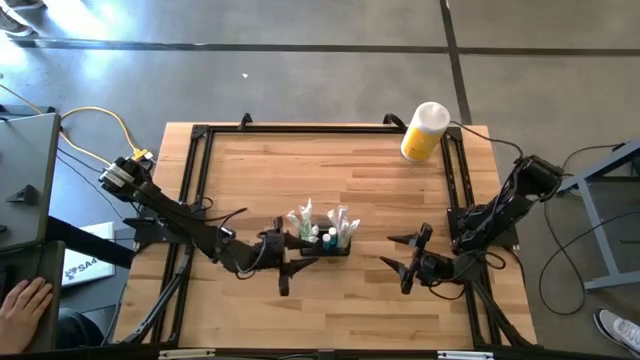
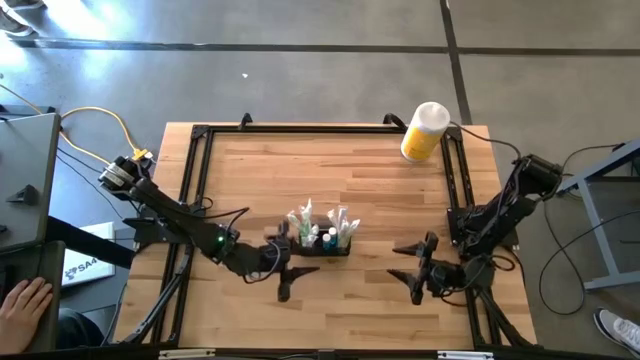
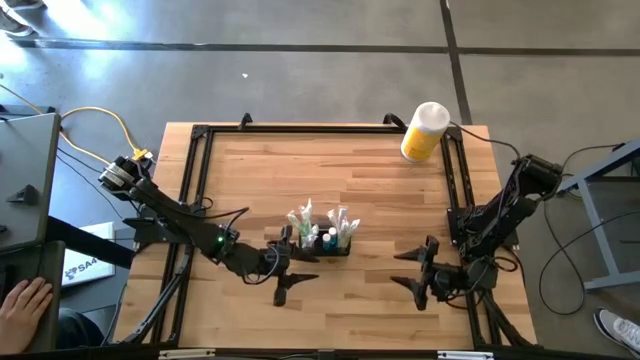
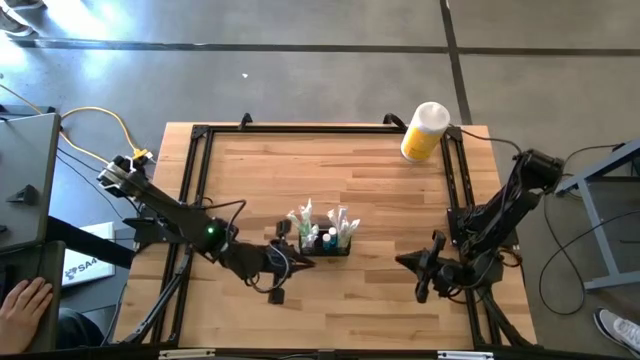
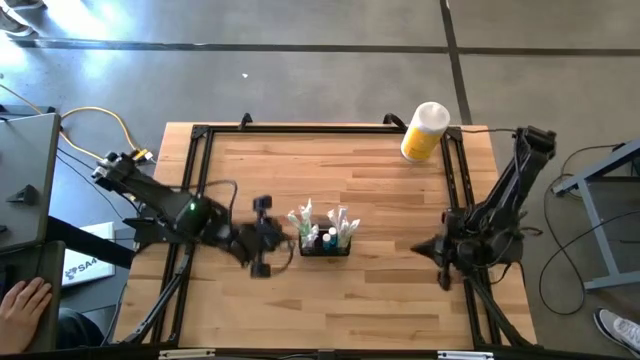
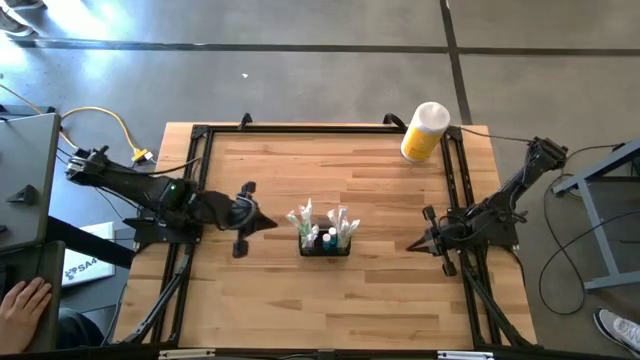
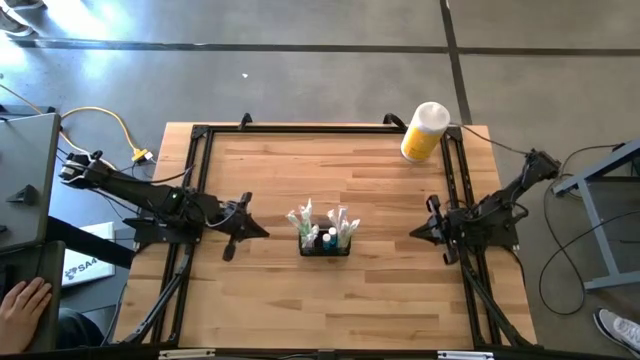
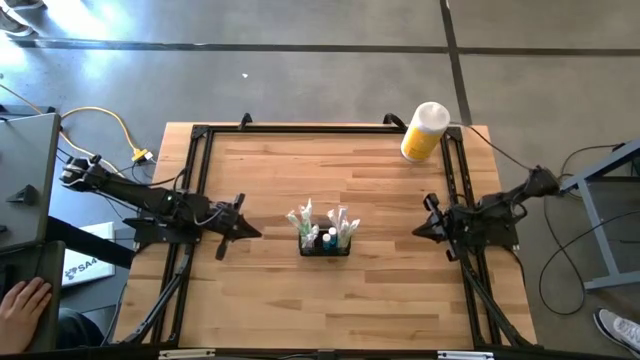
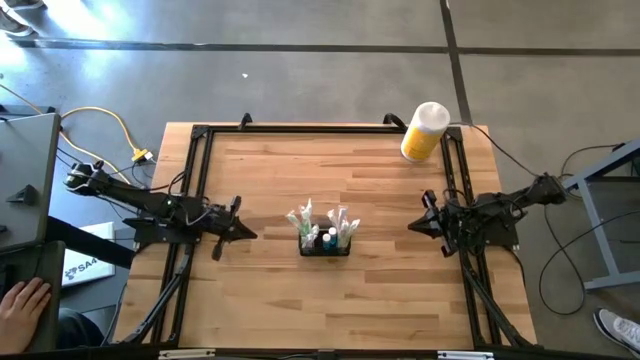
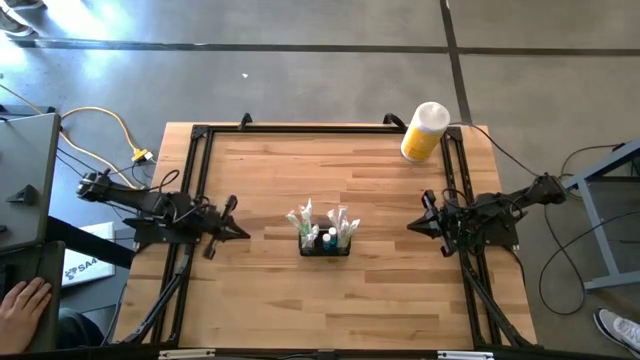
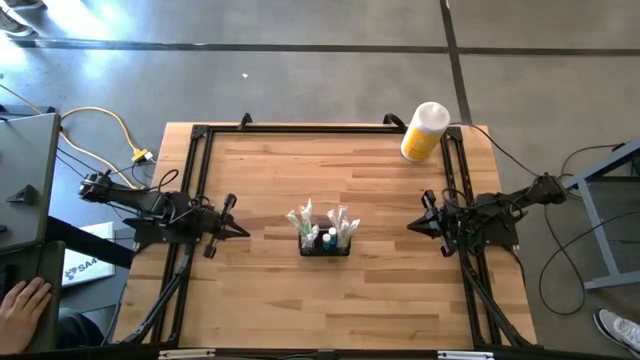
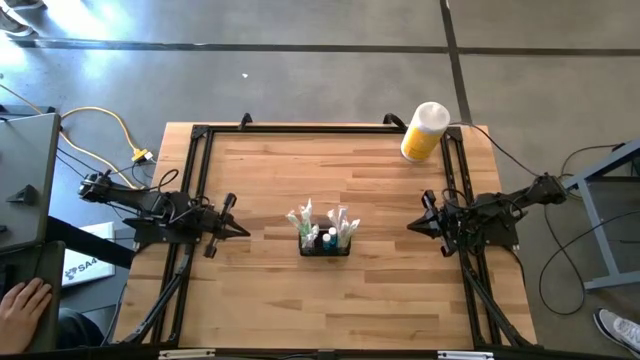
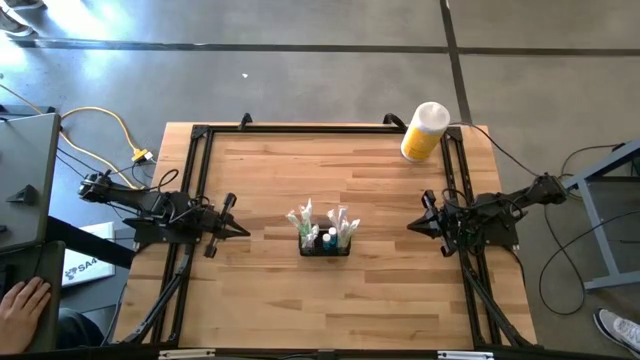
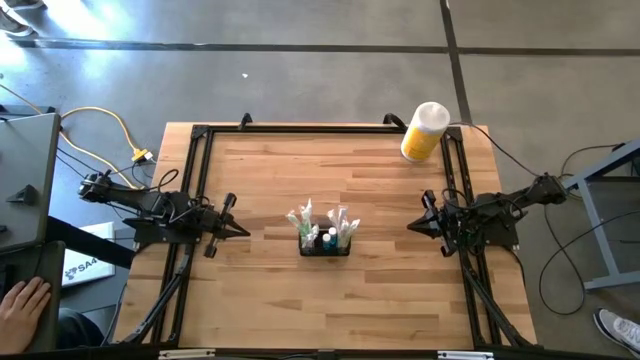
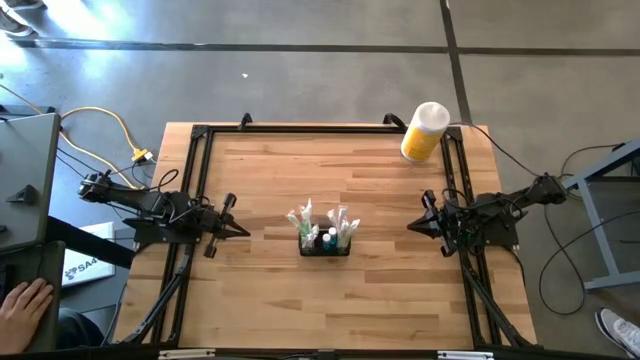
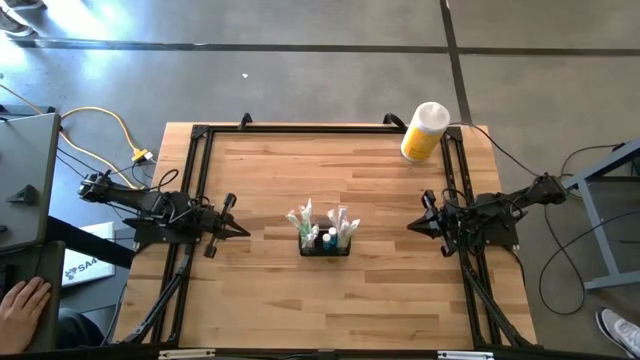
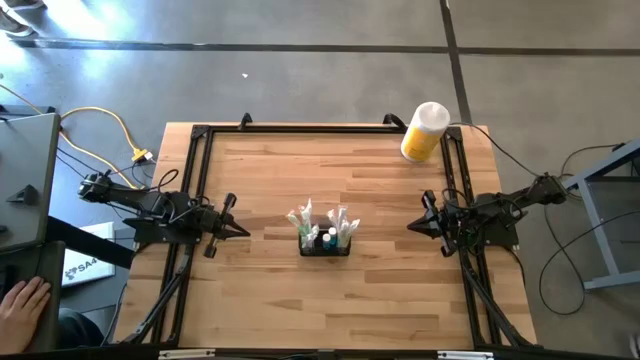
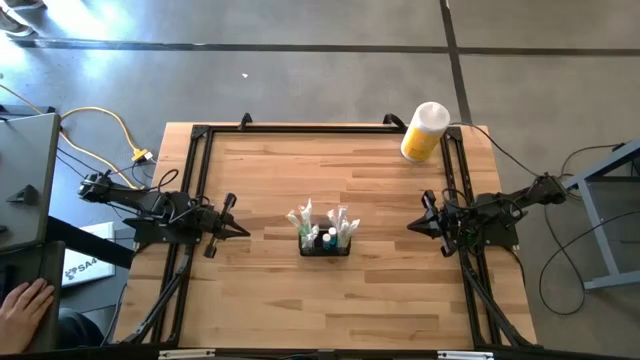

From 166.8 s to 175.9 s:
Task: Pick & Place toothbrushing station
Return to Home Position

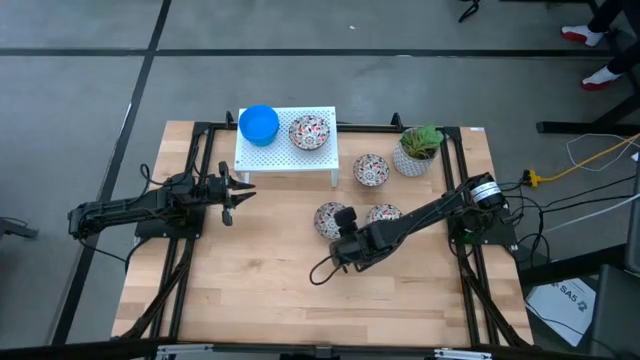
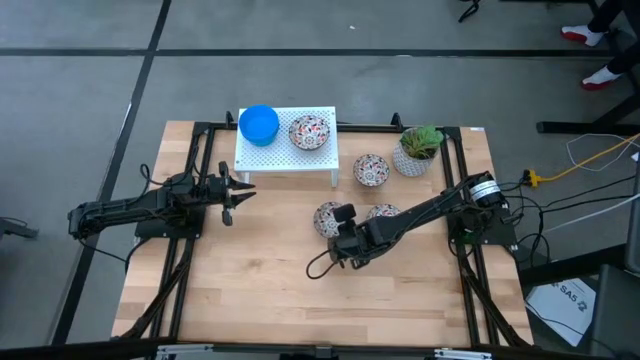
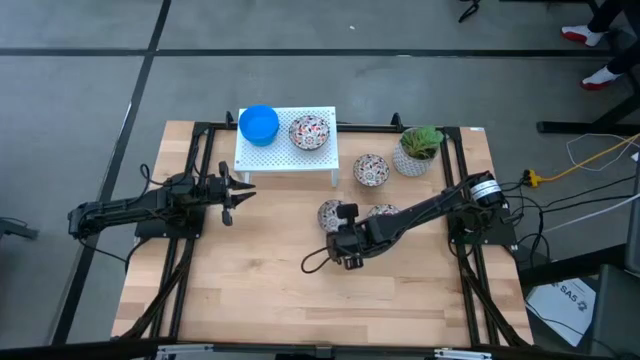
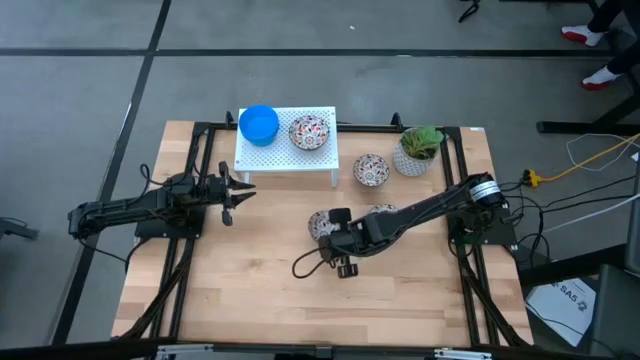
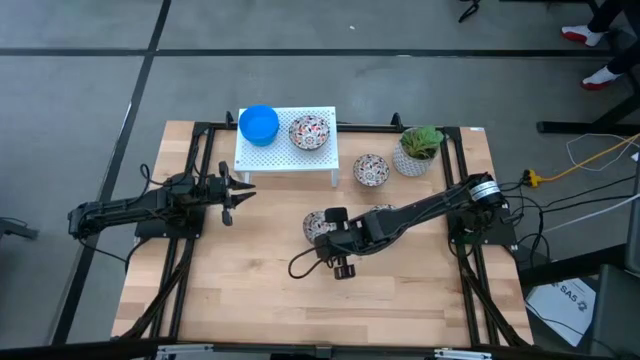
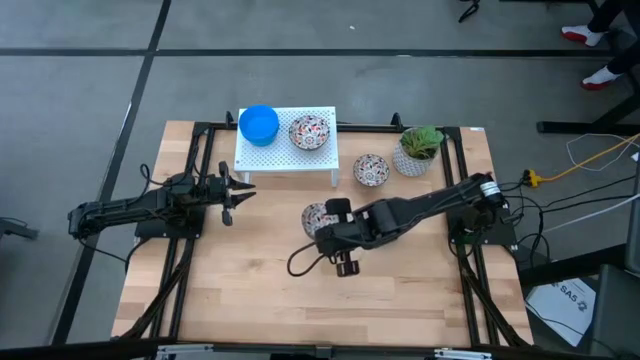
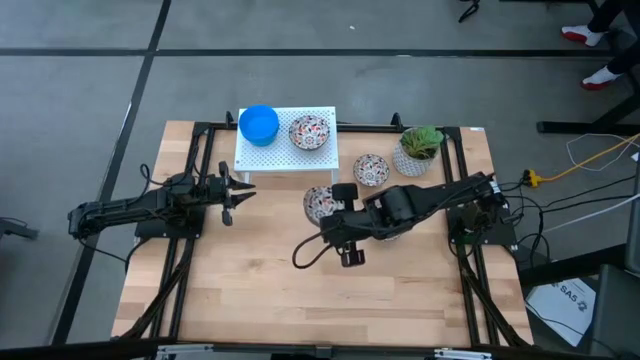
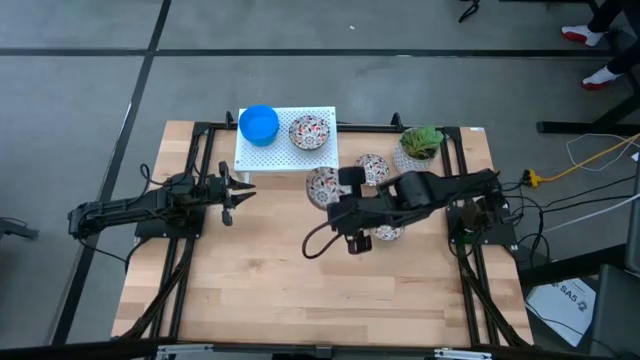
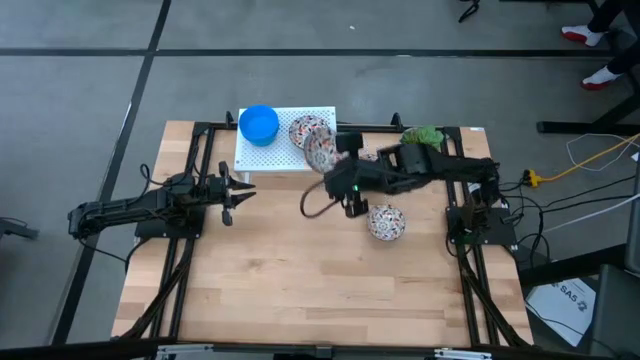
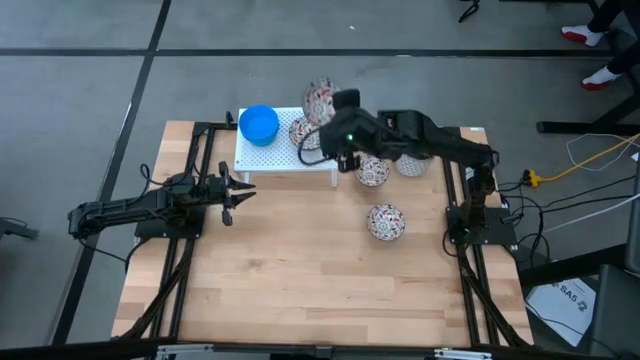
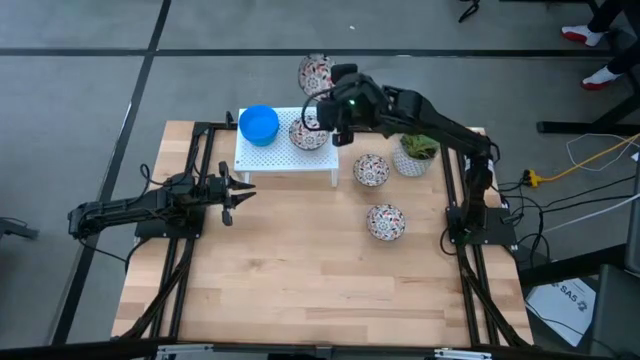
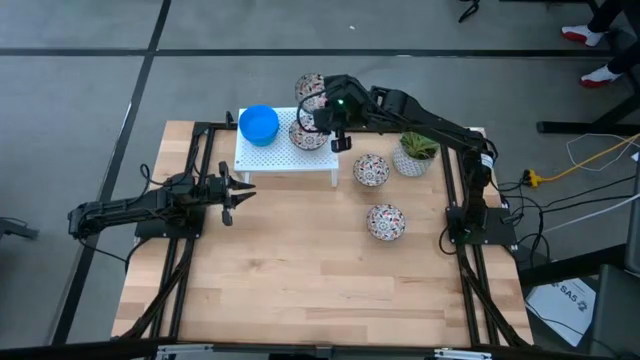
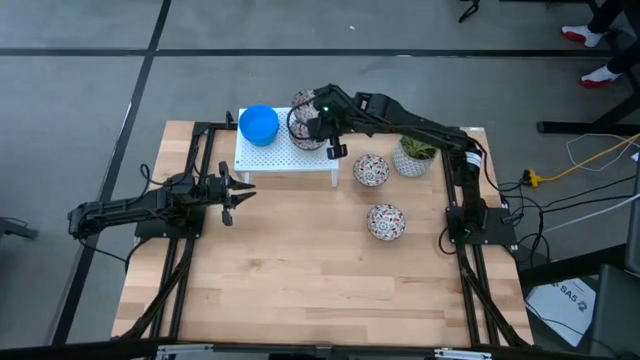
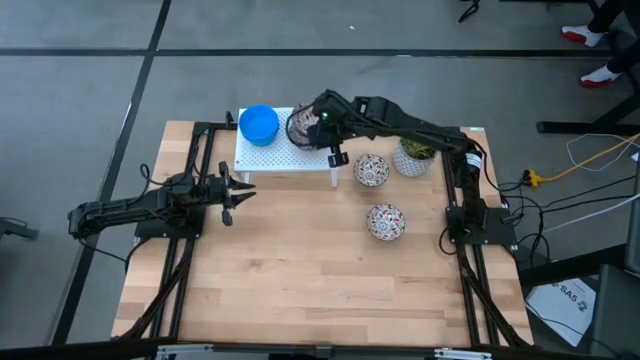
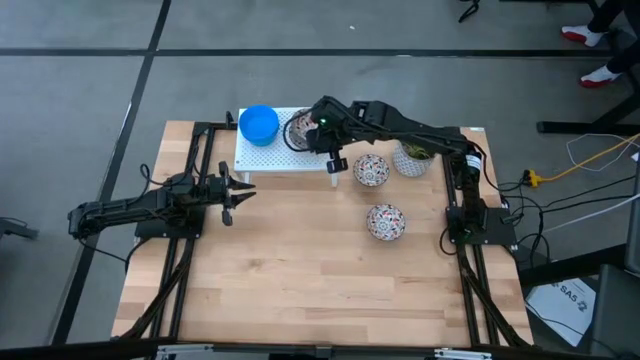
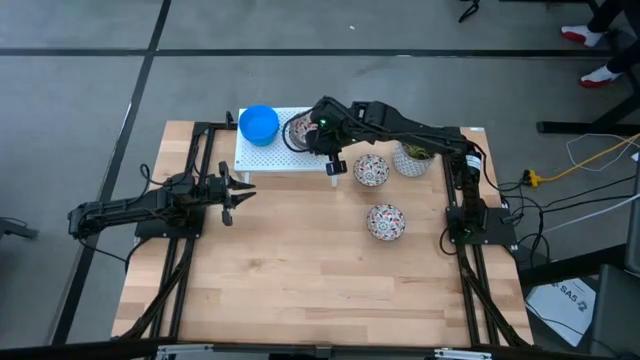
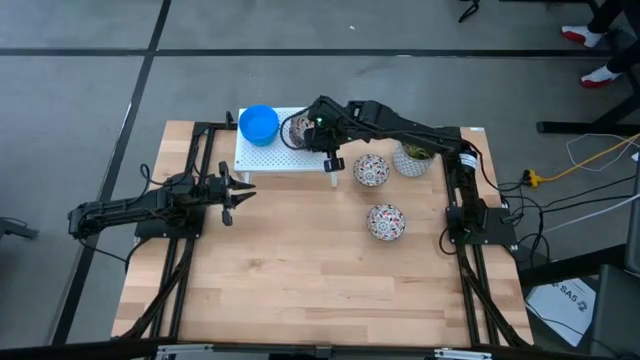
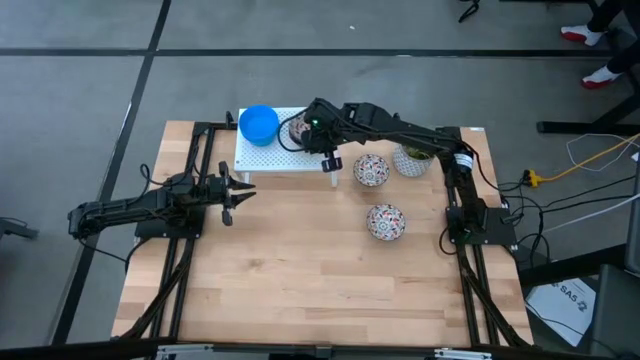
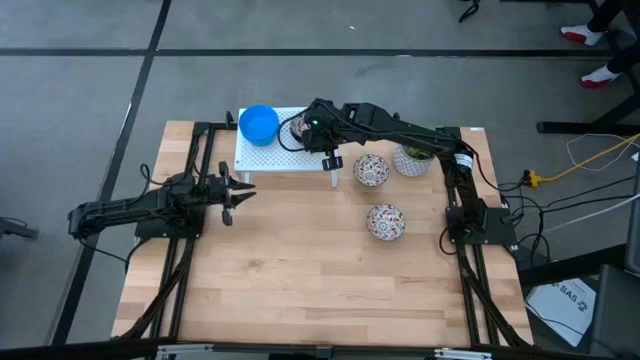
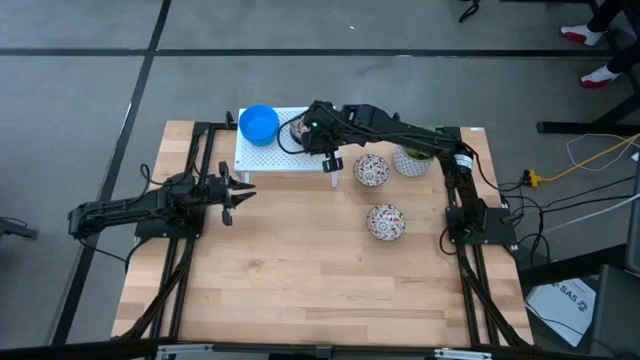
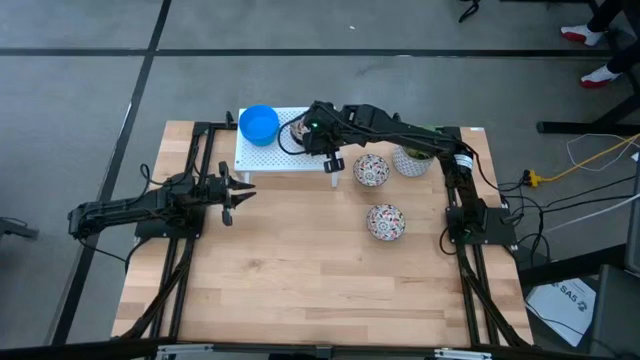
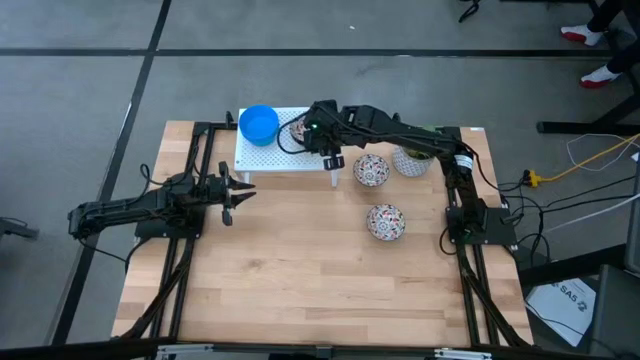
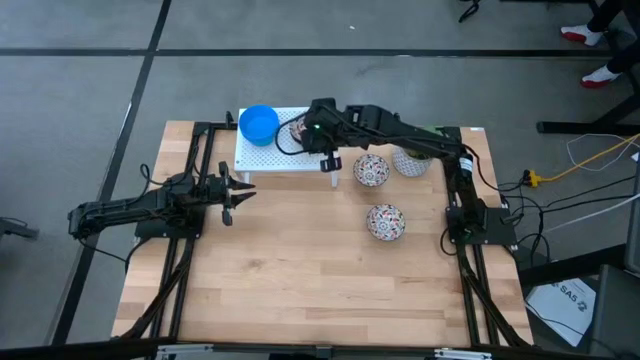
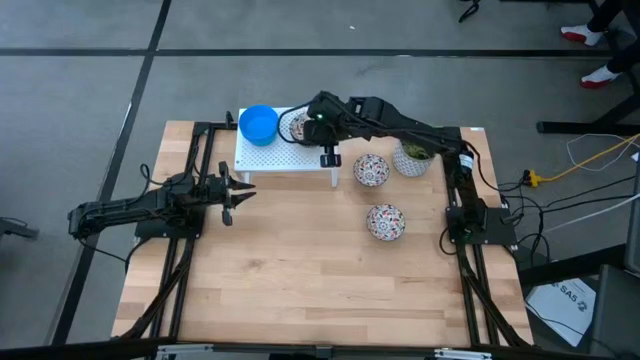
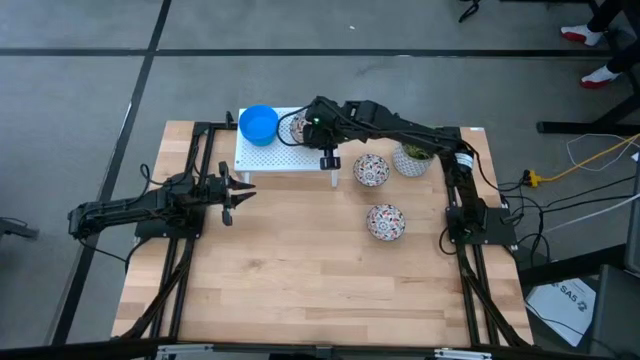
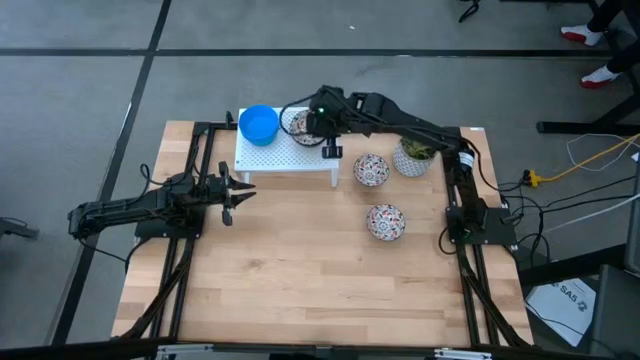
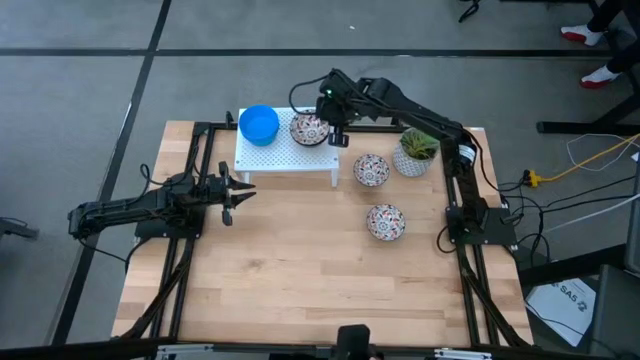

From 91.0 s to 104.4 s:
Task: Pick & Place Mini bowls
Stack the patterned black bowl on the patterned black bowl on the shelf
